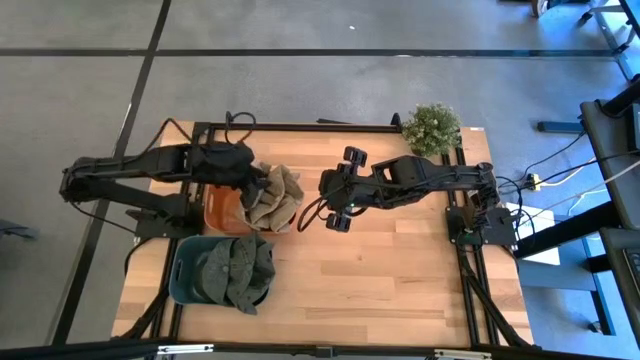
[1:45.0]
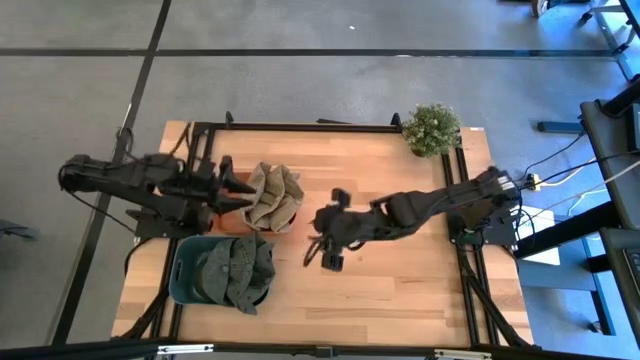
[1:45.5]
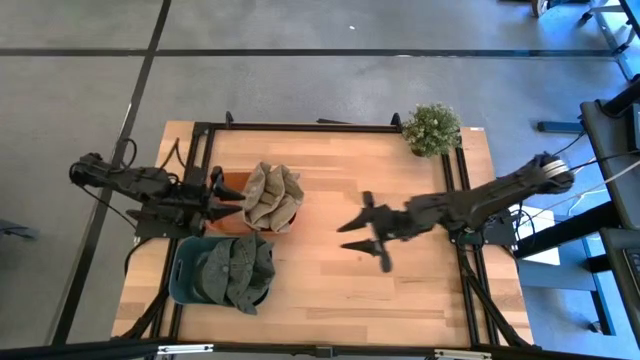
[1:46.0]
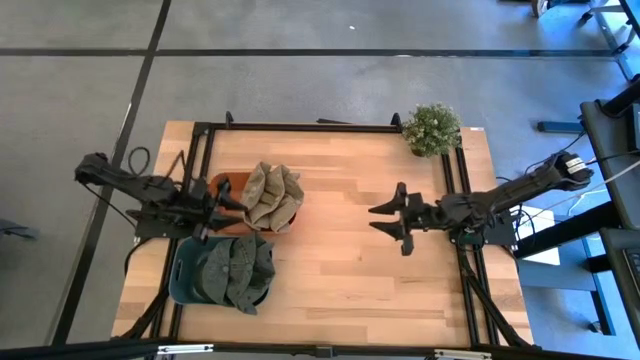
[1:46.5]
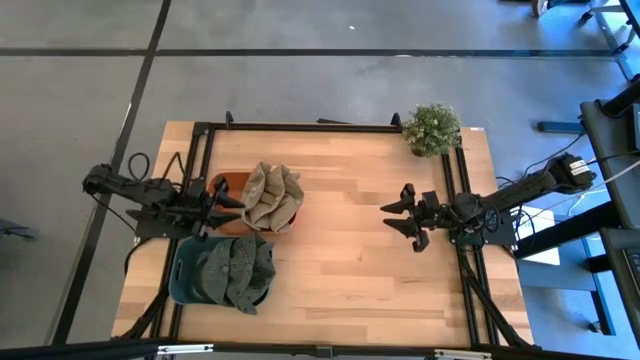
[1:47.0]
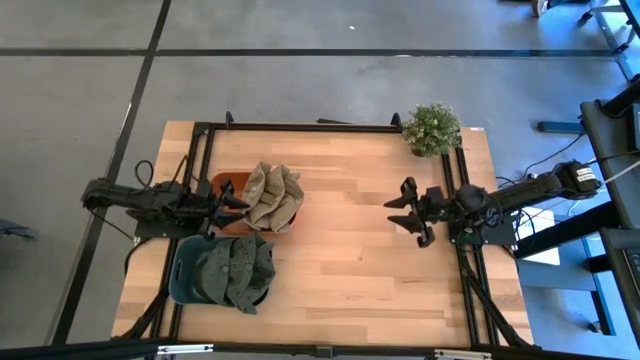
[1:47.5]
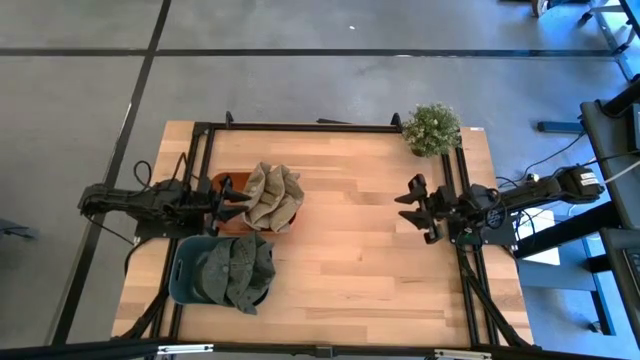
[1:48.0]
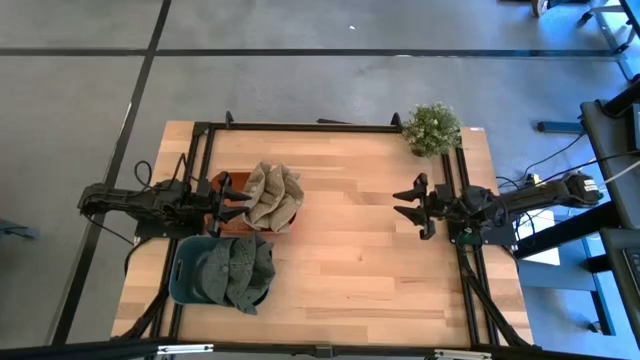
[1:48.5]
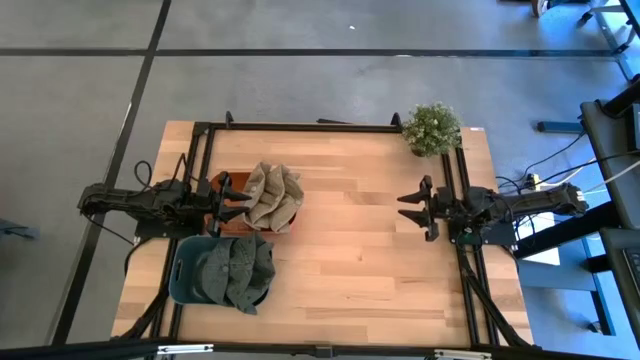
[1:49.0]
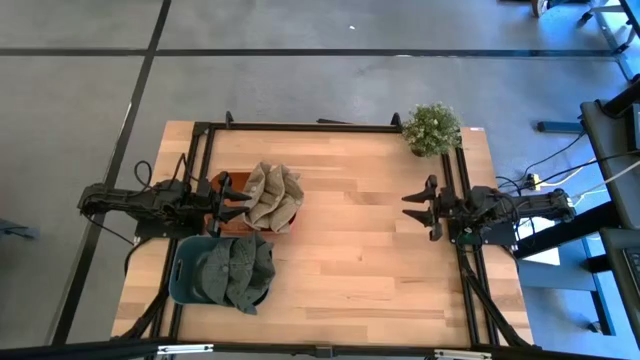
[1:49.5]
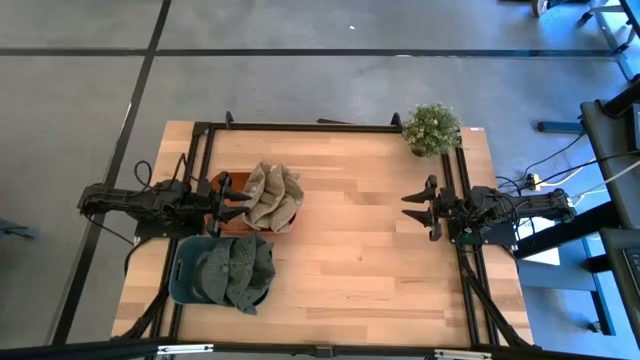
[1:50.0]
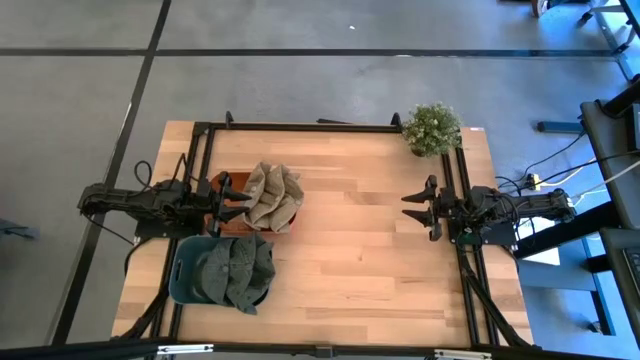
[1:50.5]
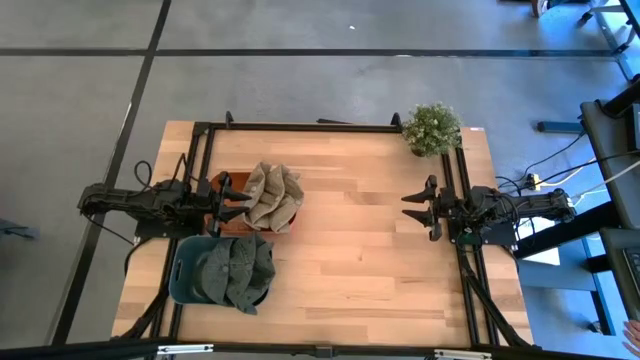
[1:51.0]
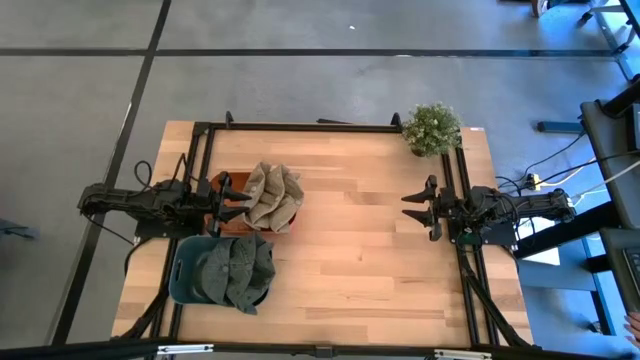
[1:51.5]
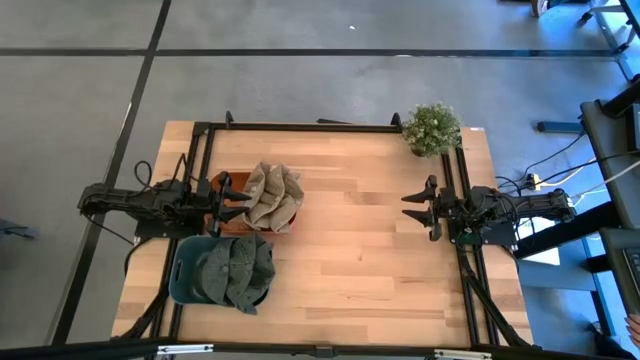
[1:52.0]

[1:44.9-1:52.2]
Task: Pick & Place hat
Return to Home Position

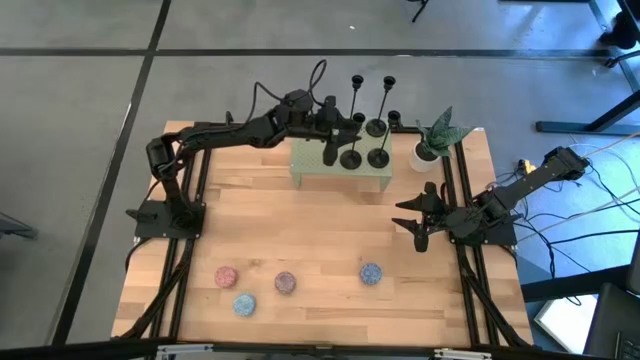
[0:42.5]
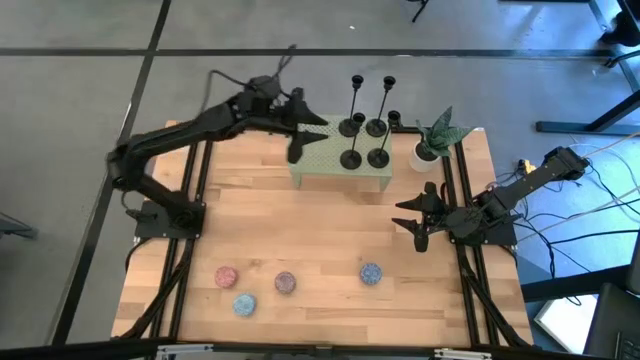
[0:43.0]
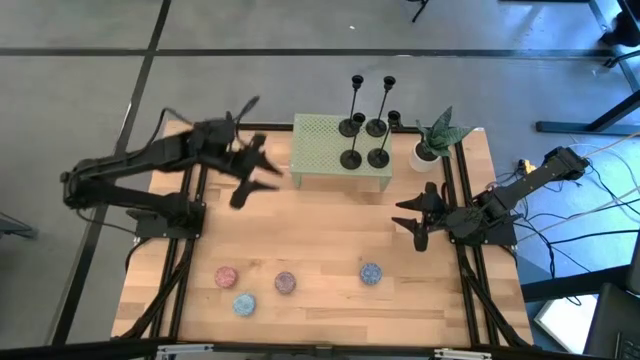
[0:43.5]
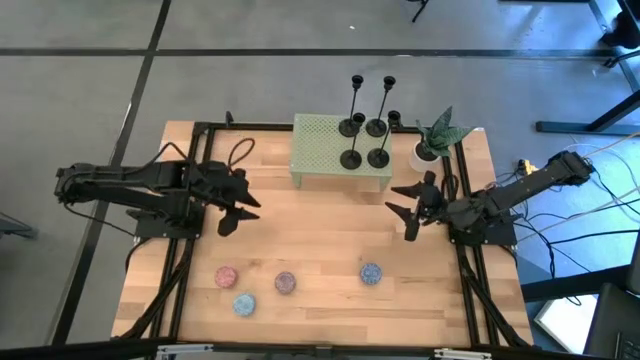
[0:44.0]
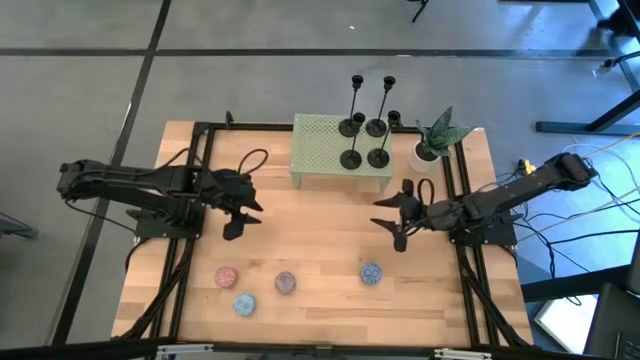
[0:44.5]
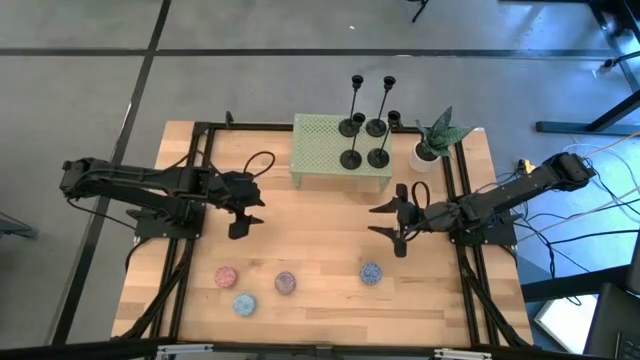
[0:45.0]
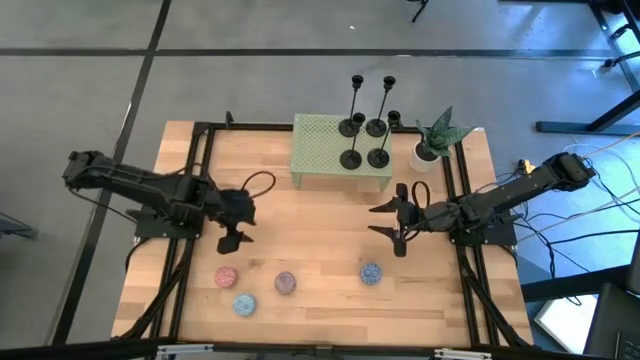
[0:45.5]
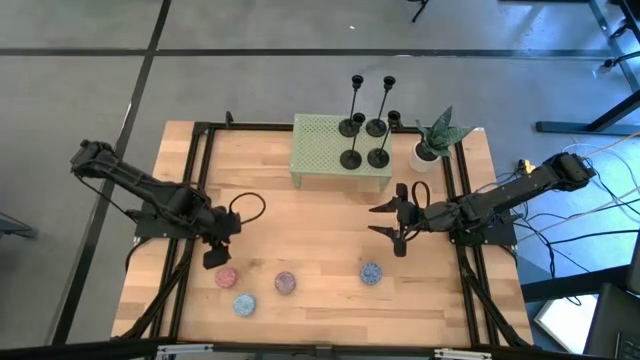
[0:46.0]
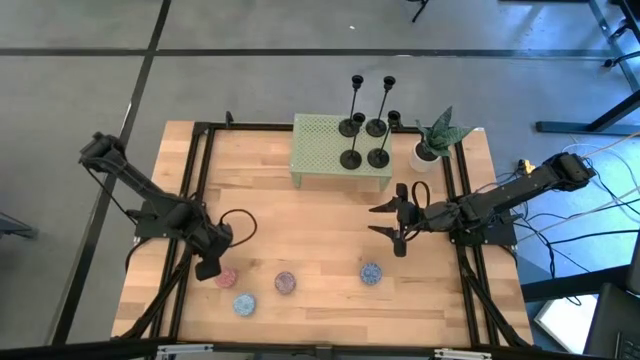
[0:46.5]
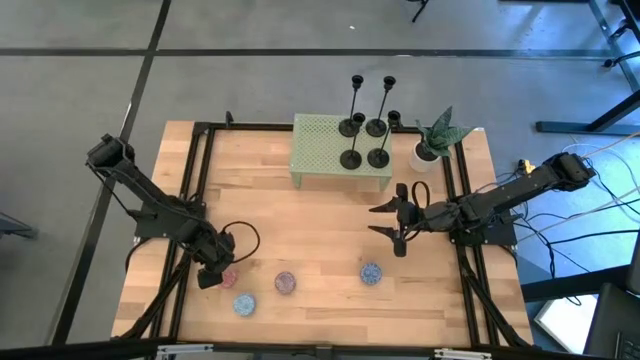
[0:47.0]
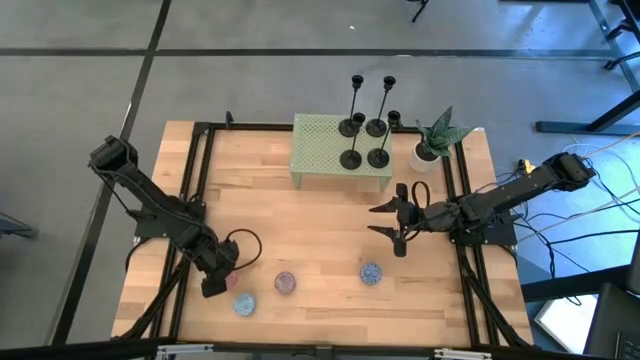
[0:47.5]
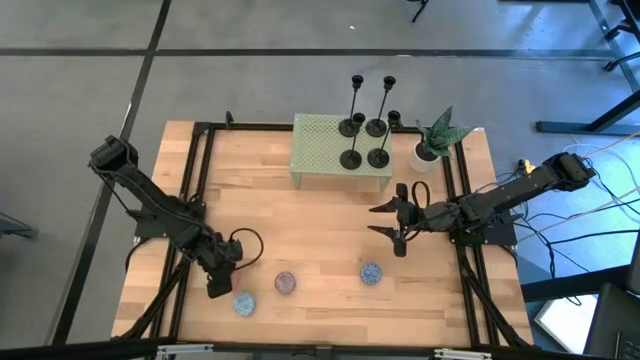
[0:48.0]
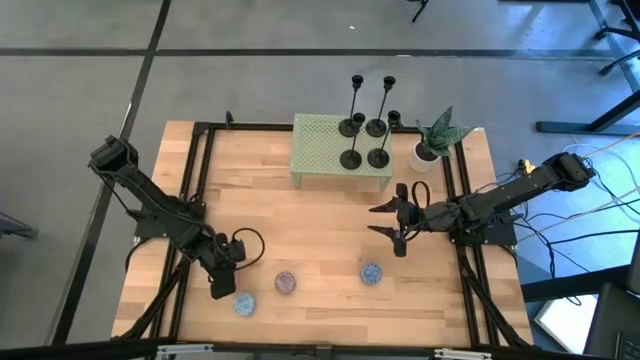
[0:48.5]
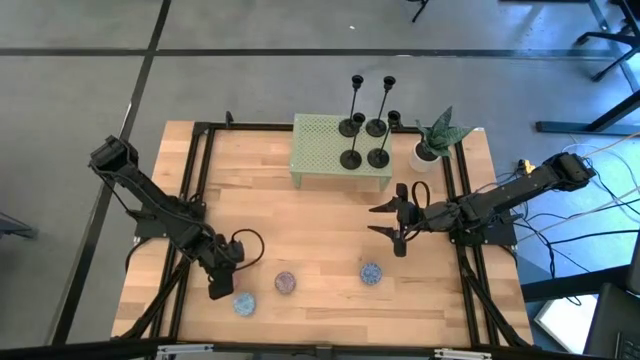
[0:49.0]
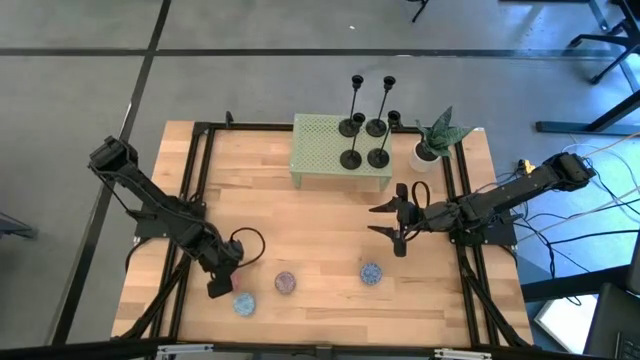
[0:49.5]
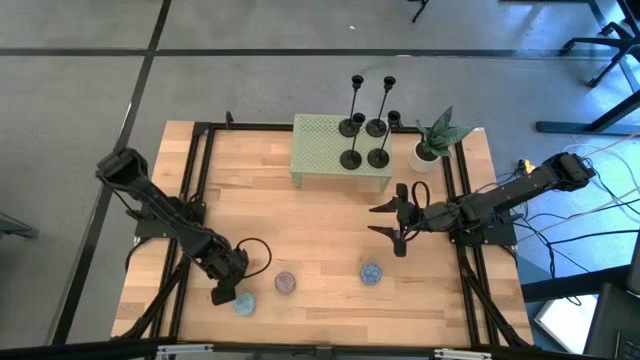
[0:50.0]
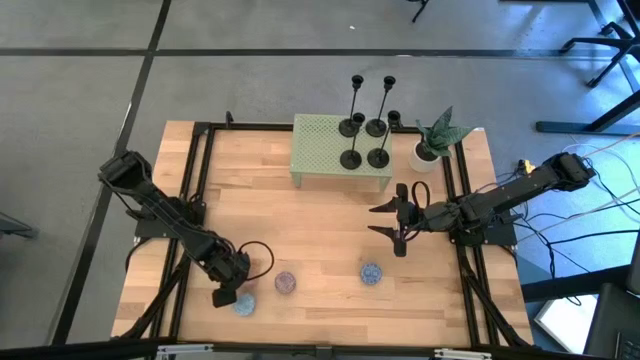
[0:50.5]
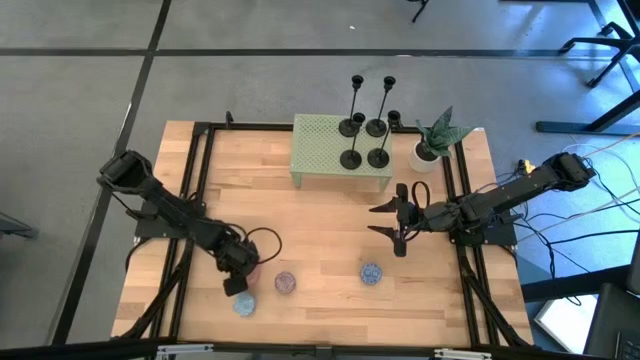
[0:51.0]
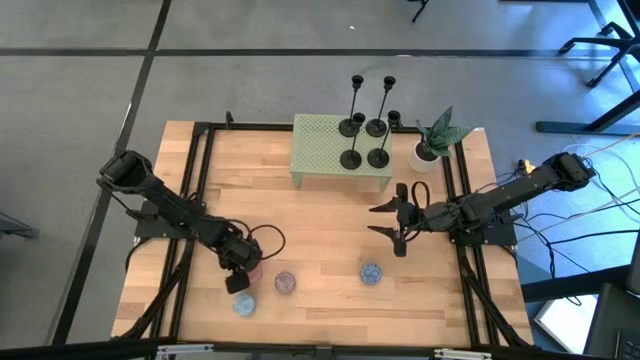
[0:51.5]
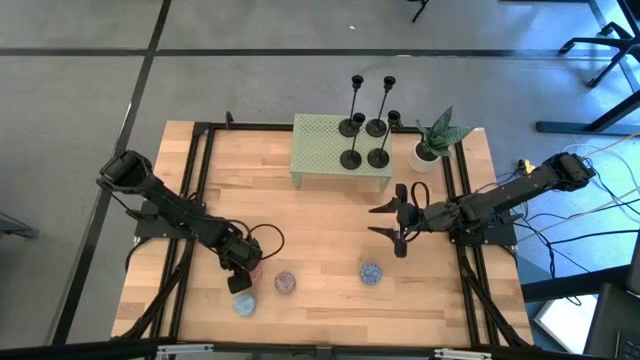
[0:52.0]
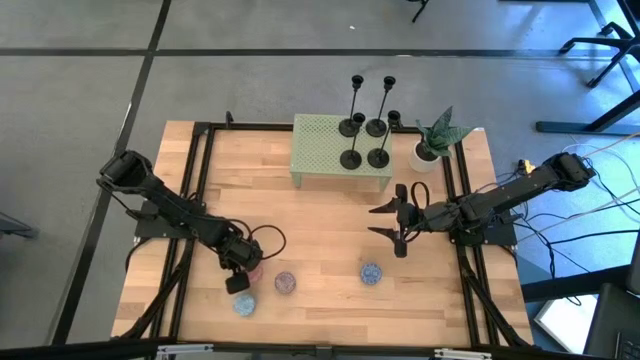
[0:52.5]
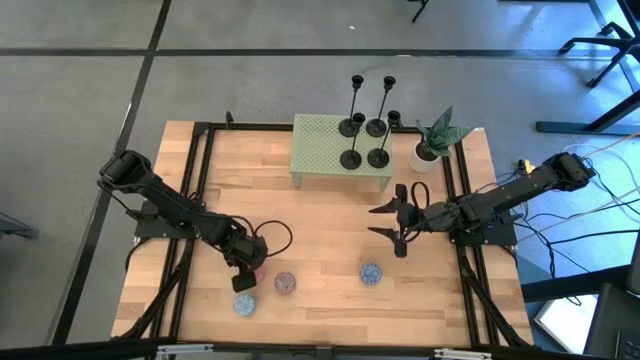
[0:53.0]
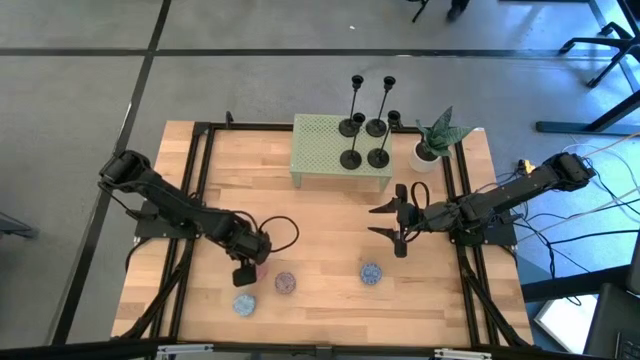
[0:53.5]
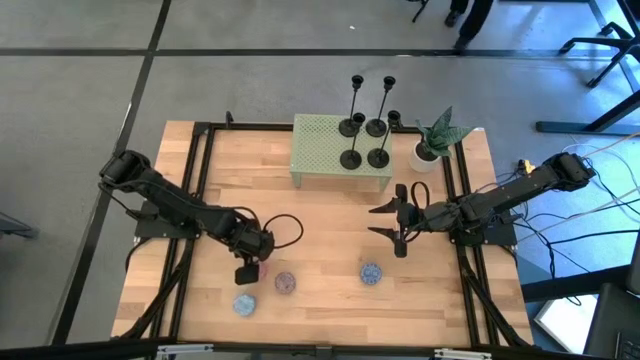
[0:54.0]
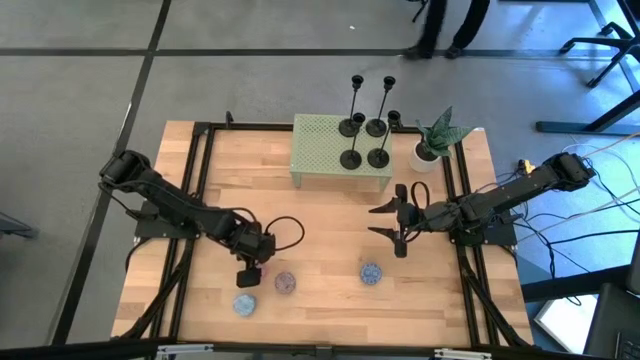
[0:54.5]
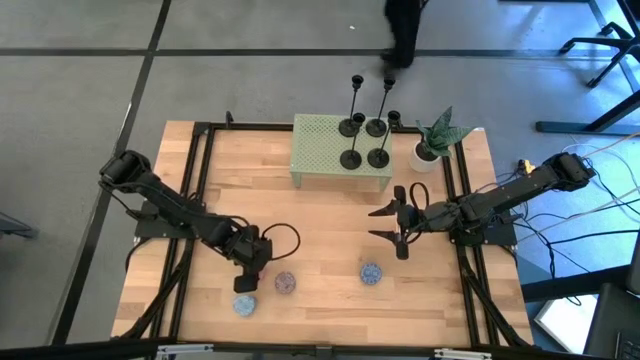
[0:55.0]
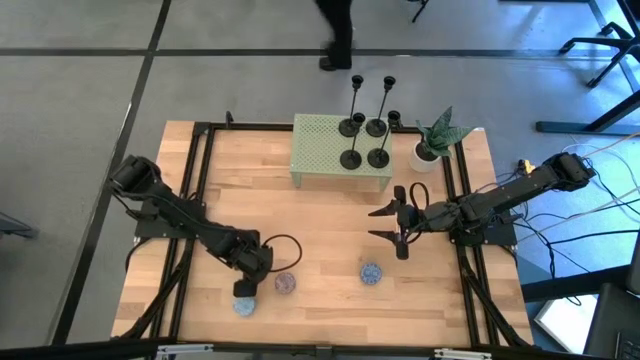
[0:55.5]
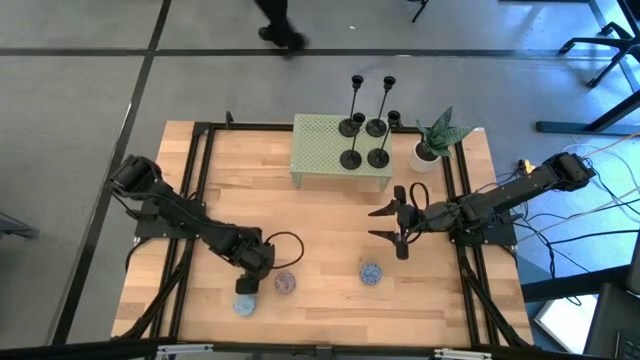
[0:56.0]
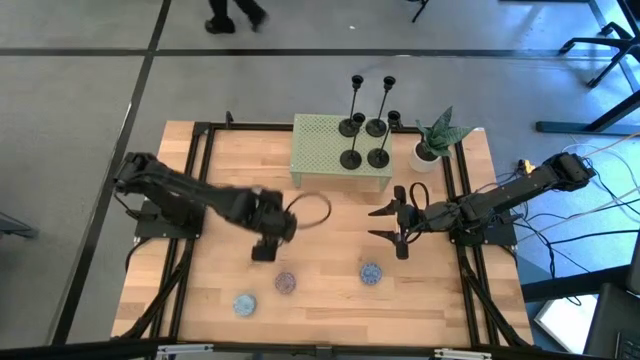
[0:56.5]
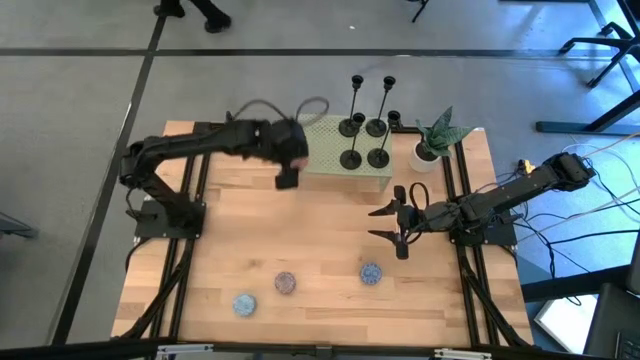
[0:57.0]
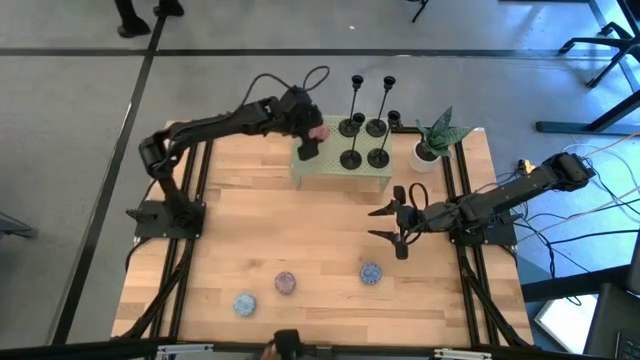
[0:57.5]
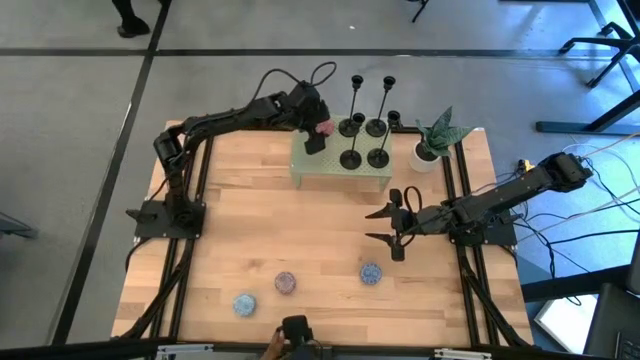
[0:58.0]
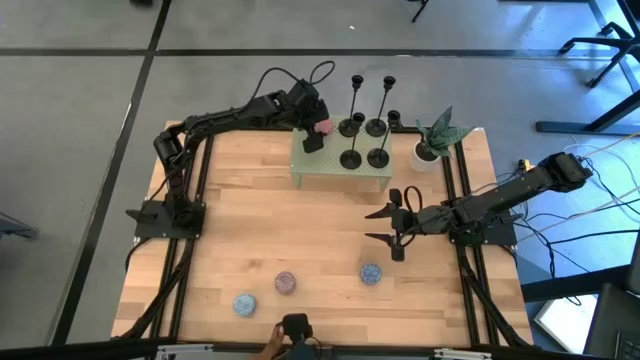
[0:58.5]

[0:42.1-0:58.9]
Task: Pick & Place candle stick holders
Put the orange scented candle on the shelf
